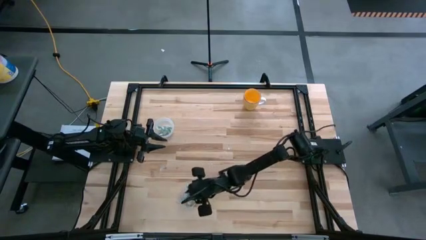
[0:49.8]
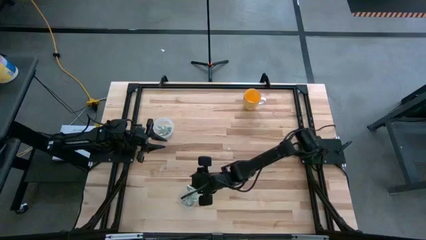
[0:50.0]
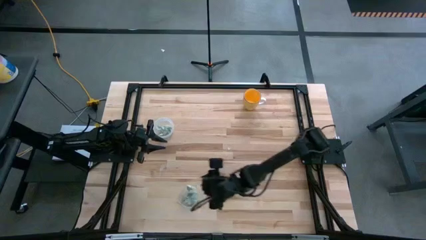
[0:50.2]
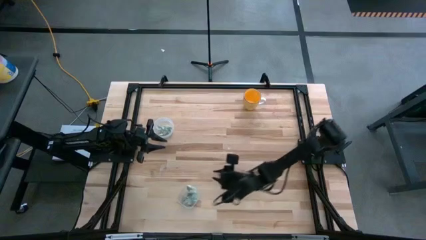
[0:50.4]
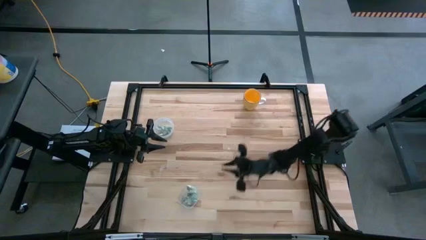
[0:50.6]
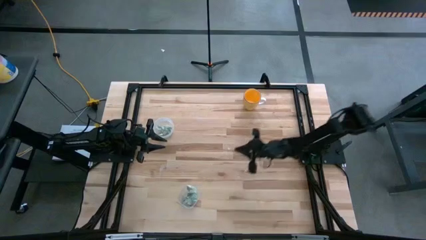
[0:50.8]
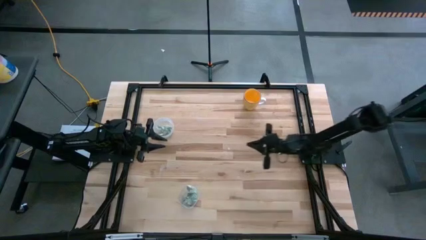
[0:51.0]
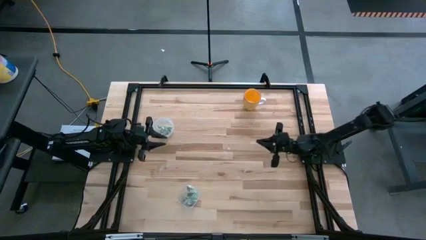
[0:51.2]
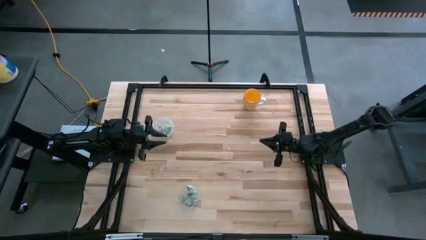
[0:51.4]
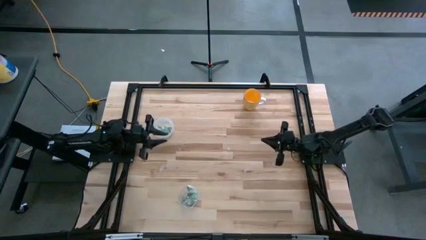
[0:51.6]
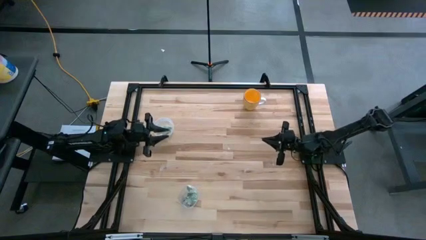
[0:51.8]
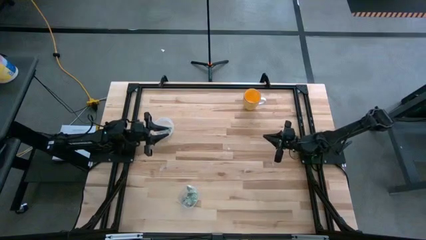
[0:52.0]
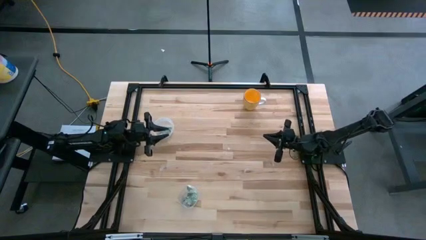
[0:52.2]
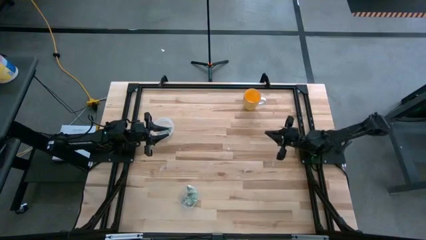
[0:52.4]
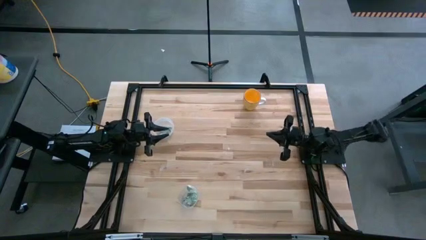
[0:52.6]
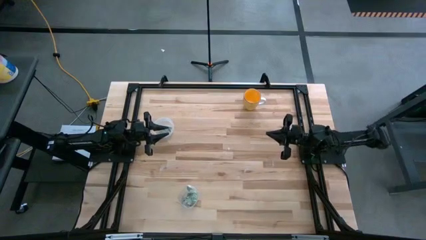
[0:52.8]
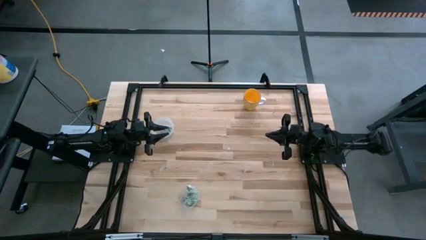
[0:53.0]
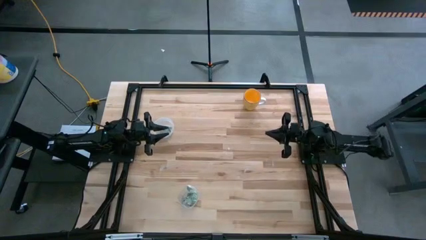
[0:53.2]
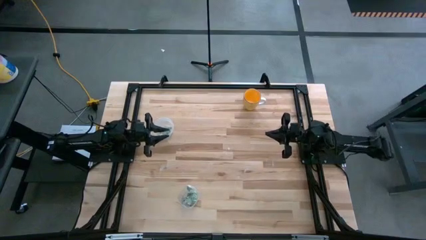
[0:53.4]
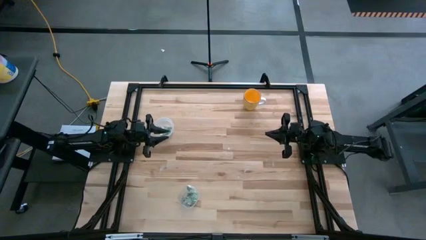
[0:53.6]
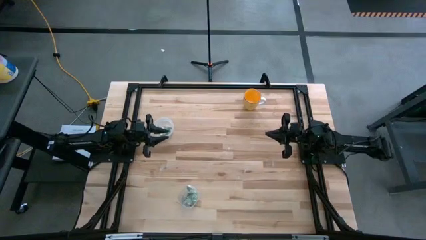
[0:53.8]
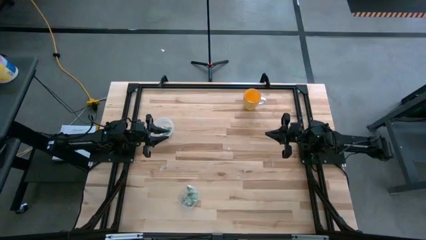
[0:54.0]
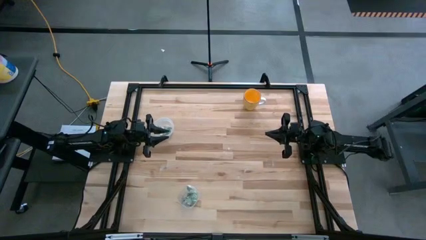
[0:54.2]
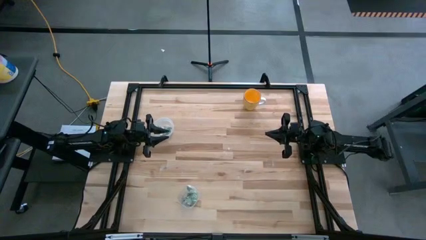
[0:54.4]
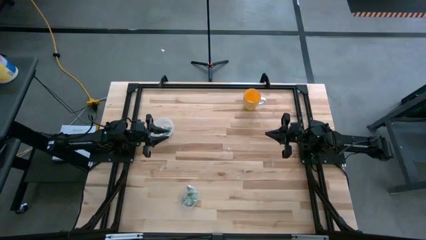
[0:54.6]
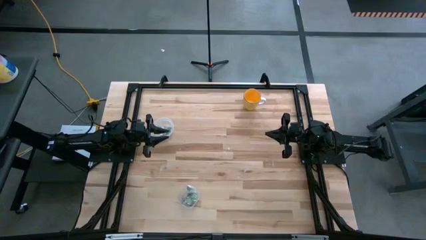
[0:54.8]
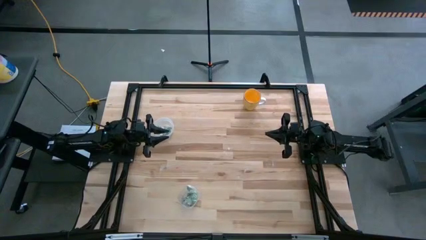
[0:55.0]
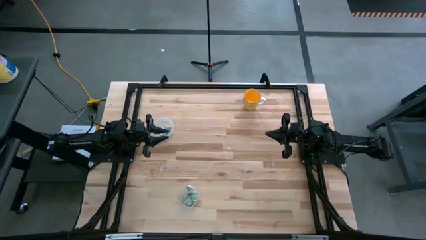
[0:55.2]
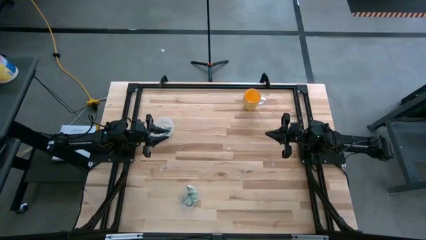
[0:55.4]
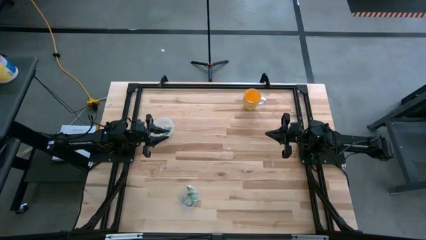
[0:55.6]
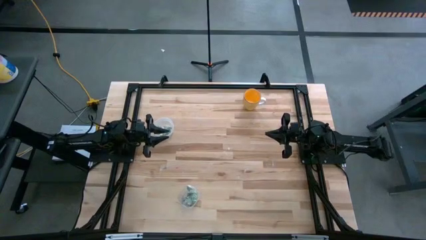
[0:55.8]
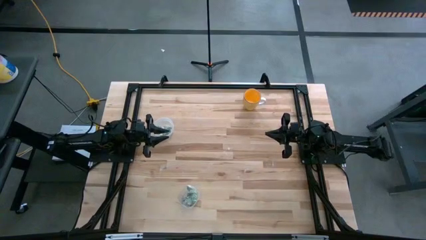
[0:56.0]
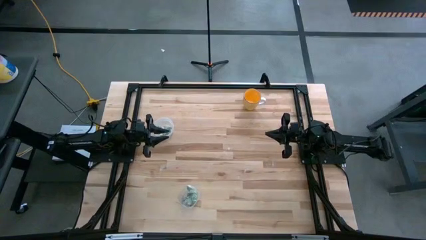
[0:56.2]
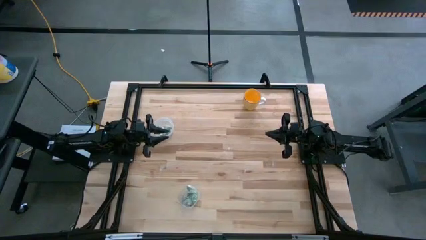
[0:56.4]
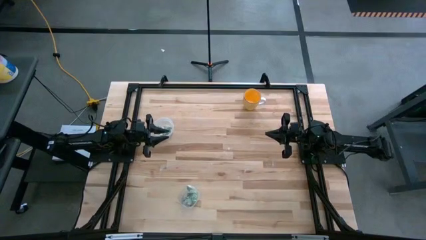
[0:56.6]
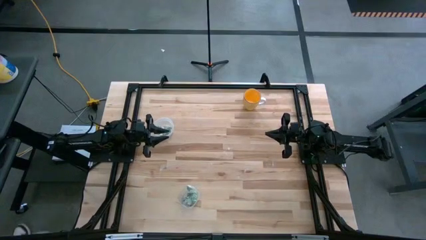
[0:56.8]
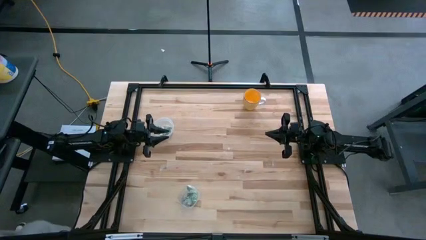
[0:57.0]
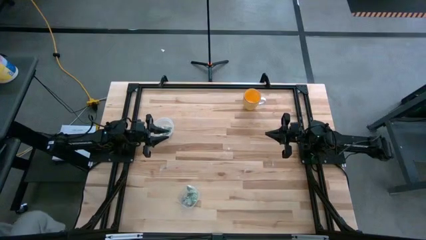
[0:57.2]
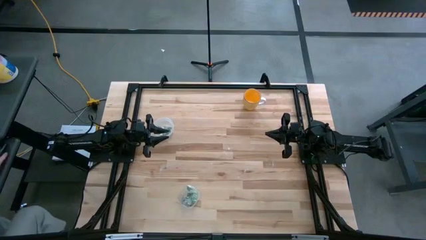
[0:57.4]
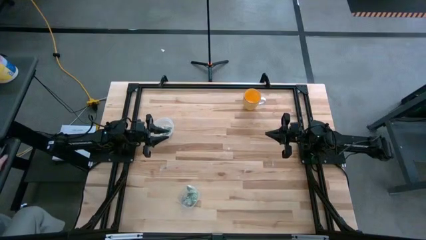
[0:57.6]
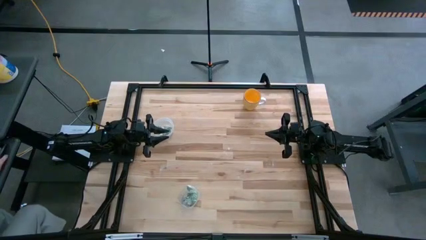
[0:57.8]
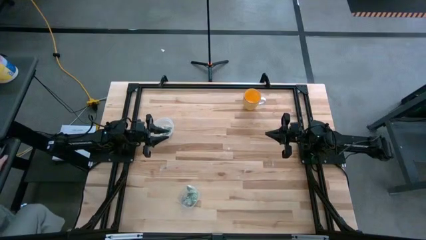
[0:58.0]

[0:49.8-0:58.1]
Task: Pick and place items into bin
Return to Home Position

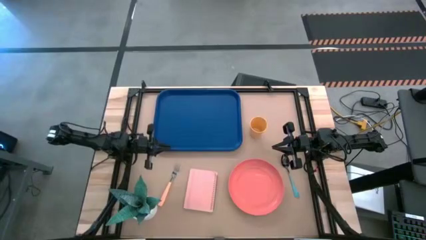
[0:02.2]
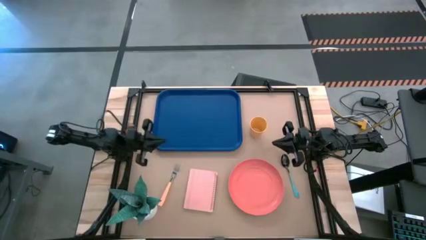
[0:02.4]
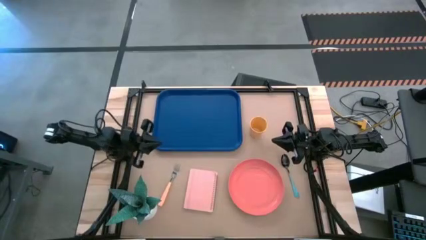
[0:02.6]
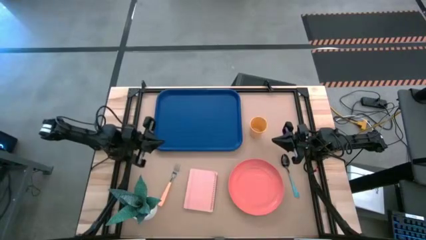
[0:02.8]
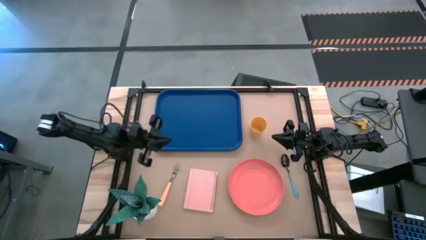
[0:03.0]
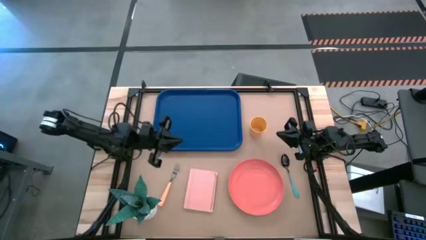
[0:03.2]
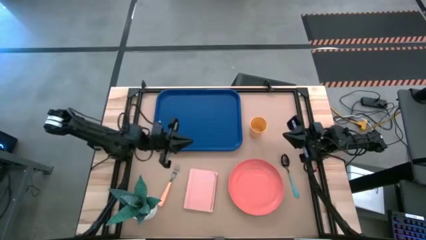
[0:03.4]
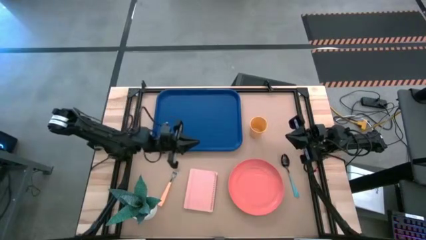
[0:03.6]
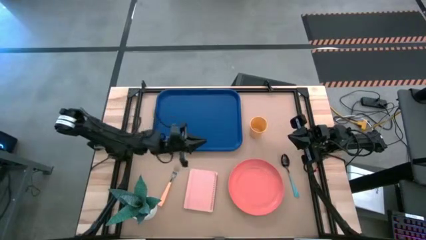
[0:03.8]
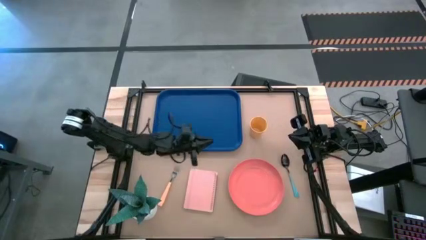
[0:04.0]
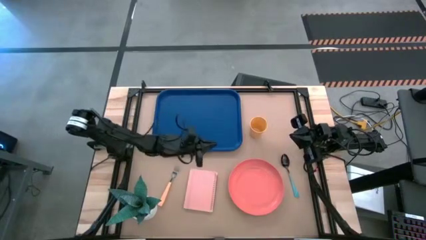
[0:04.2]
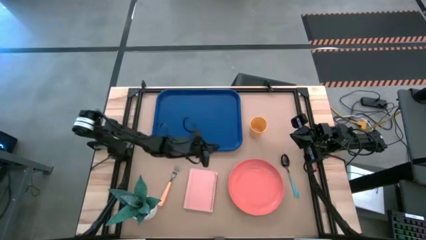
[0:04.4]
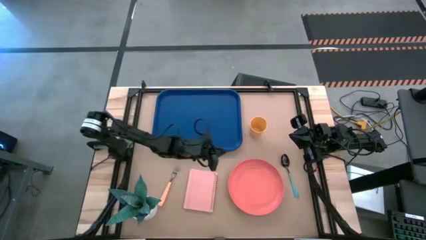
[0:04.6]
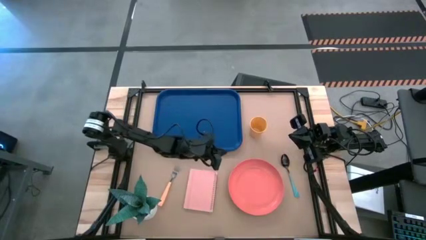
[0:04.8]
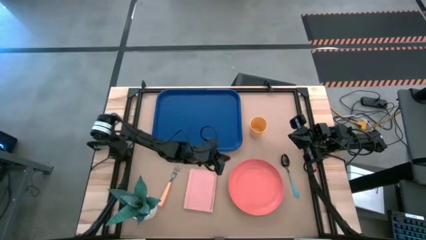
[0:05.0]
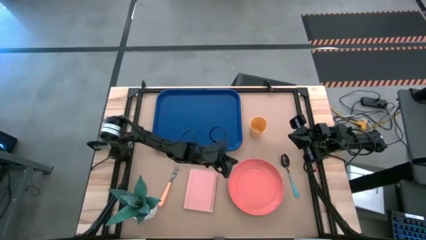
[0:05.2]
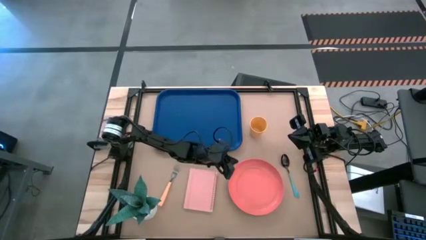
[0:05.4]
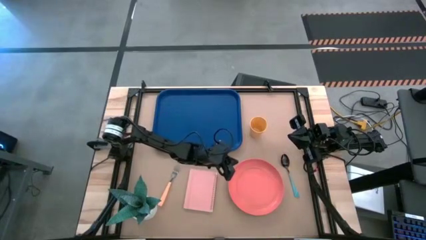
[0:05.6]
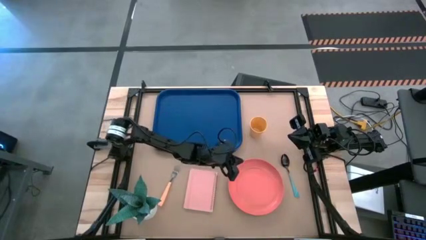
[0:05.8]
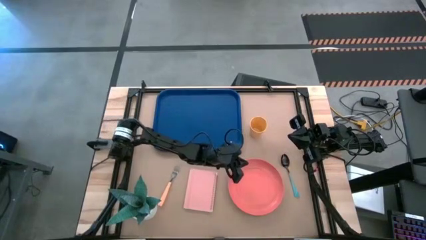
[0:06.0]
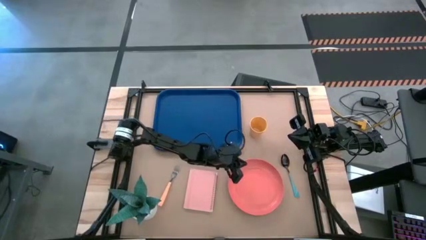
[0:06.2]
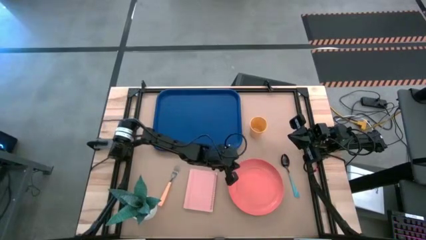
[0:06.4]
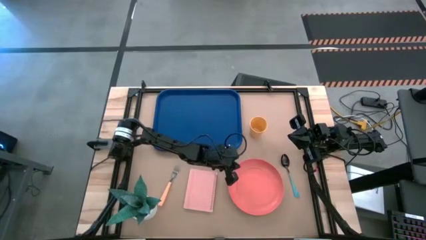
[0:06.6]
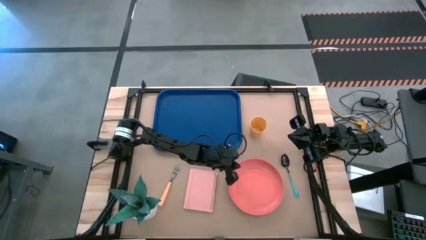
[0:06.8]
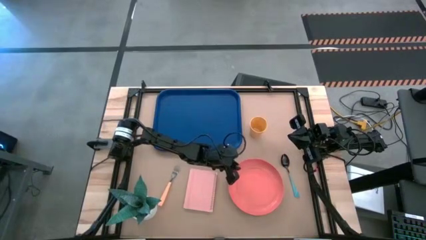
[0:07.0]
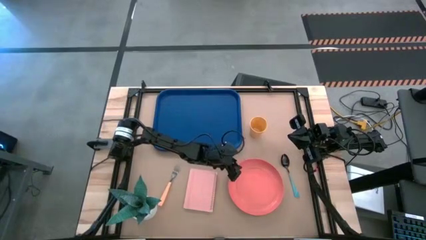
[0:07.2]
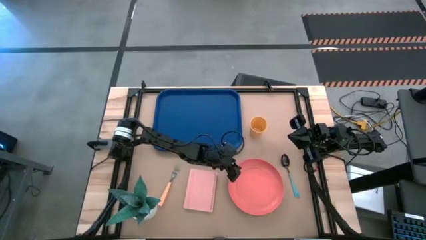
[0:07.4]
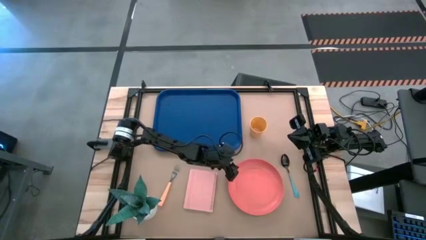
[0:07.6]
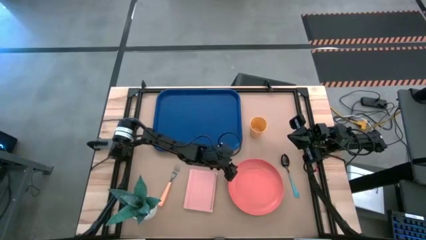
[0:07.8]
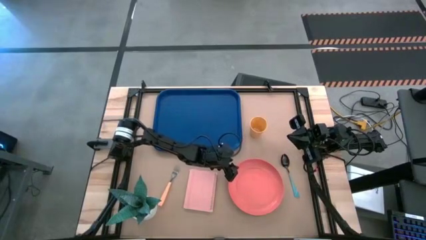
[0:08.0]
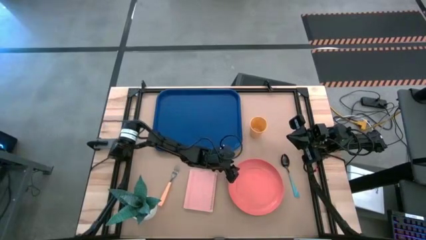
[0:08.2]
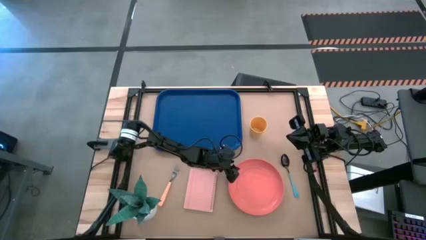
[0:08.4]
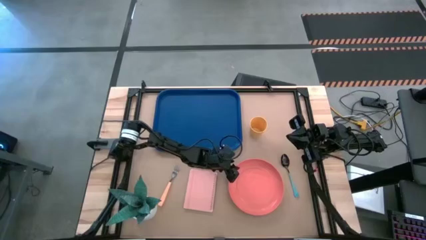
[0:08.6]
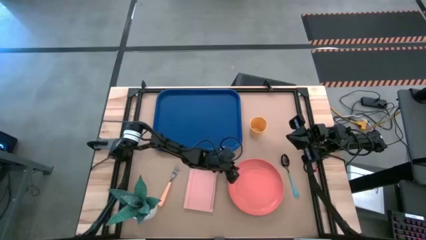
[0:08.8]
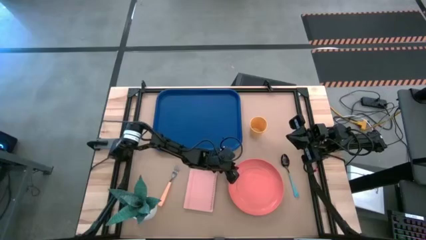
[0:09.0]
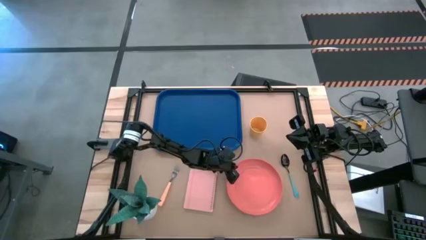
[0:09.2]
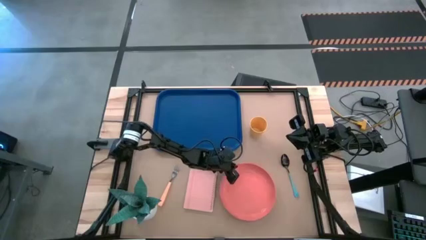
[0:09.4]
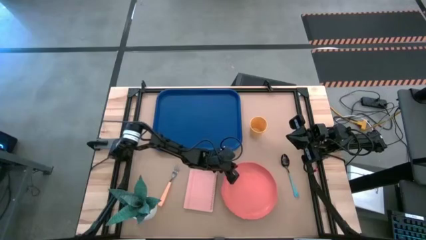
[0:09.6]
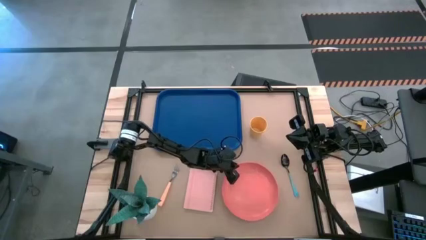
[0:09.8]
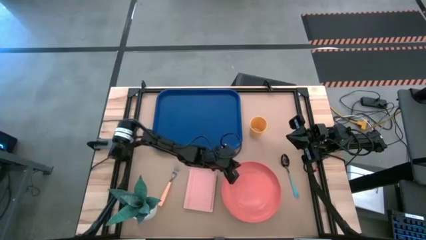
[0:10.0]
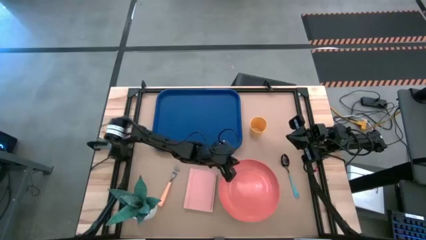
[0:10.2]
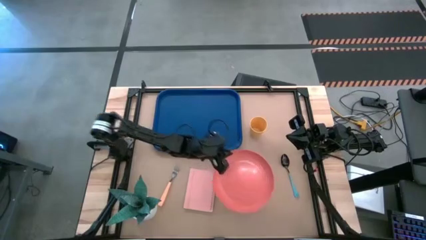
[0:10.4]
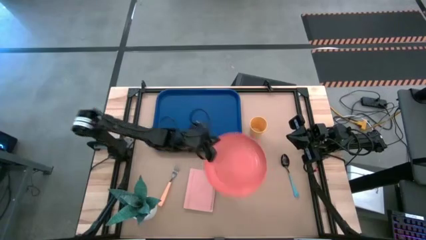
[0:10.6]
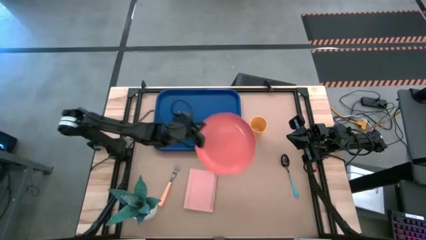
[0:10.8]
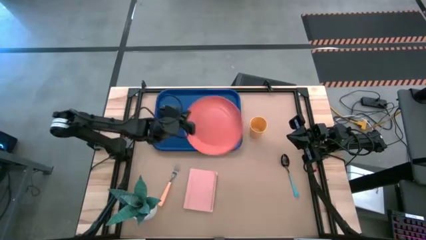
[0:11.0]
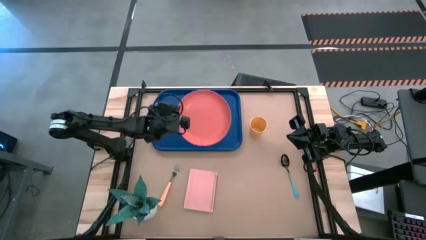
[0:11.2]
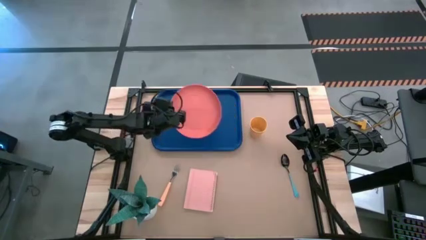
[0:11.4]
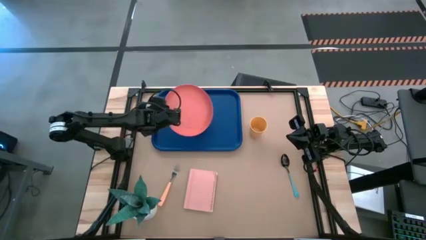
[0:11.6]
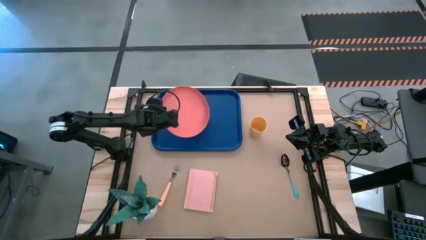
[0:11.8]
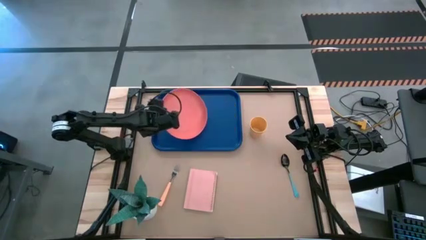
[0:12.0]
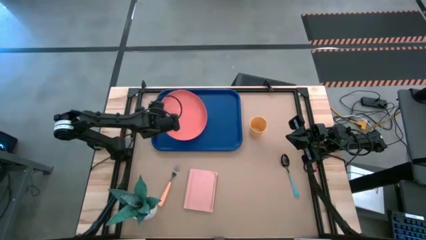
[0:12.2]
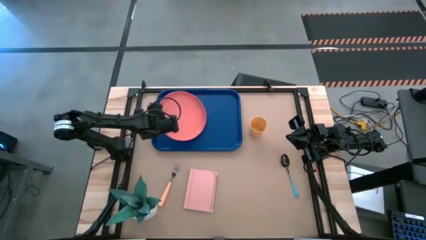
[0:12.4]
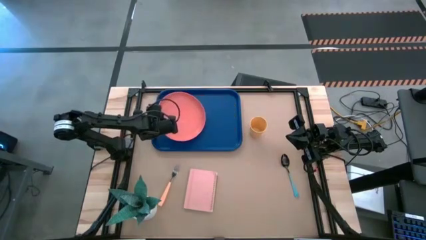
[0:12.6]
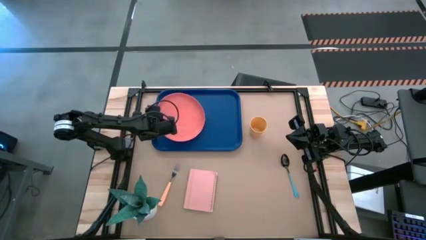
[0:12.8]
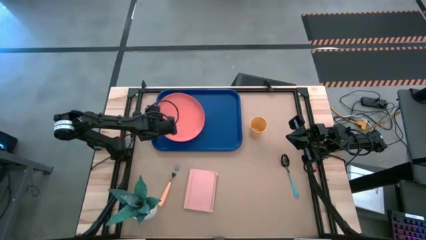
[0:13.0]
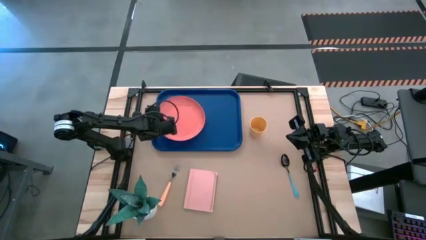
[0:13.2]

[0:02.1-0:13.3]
Task: Pick and place plate/cup/fork/spoon on tray
Put the pink plate on the blue tray
